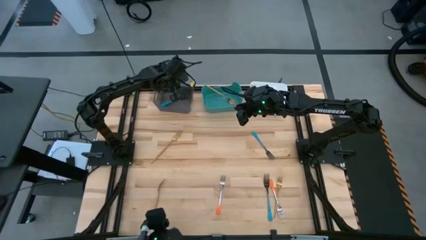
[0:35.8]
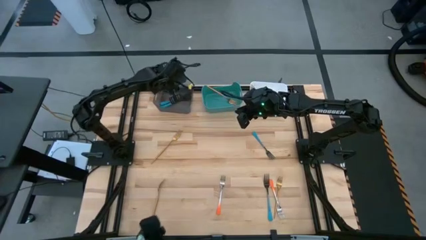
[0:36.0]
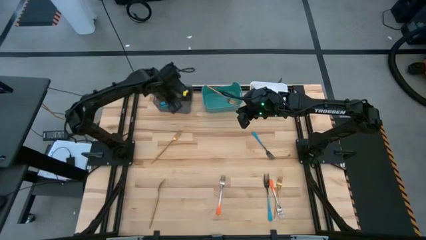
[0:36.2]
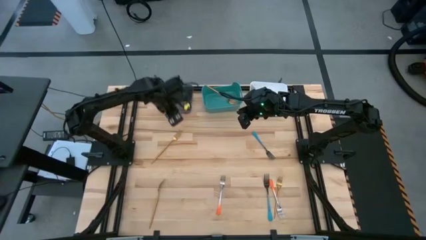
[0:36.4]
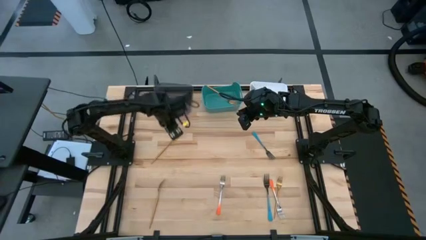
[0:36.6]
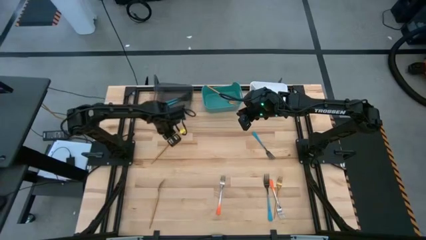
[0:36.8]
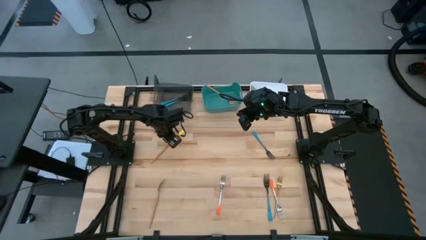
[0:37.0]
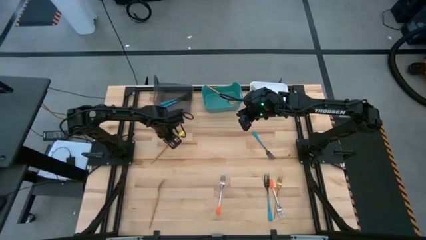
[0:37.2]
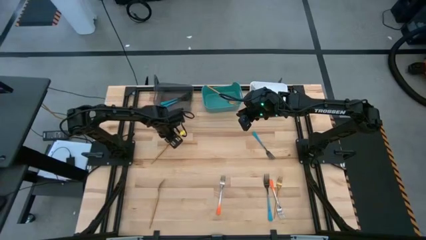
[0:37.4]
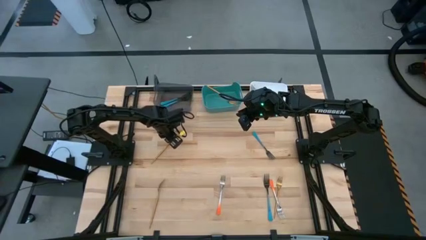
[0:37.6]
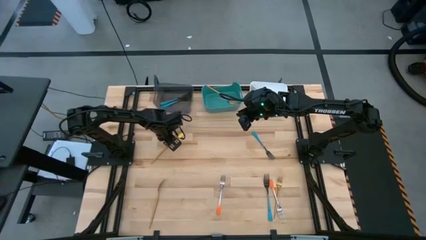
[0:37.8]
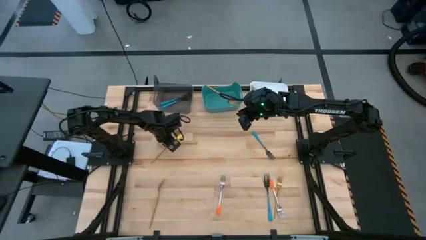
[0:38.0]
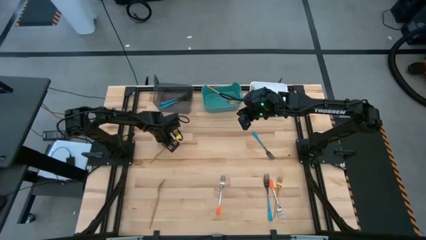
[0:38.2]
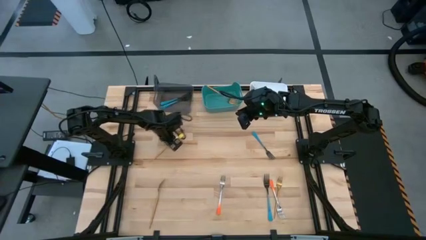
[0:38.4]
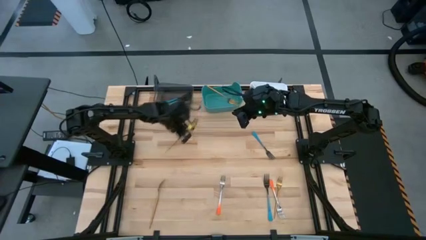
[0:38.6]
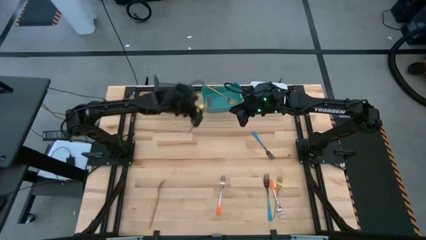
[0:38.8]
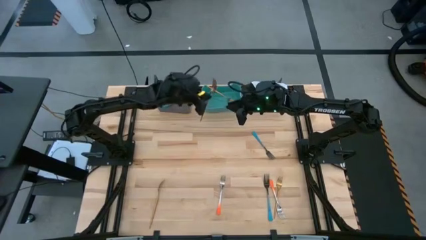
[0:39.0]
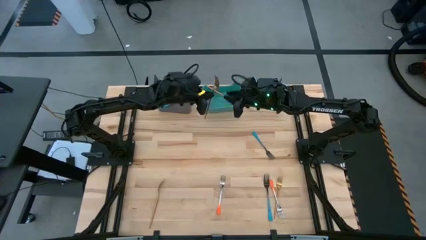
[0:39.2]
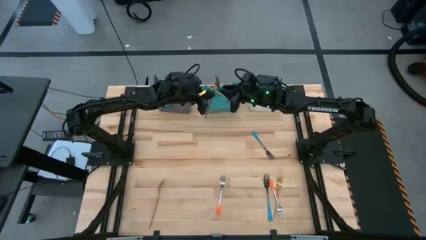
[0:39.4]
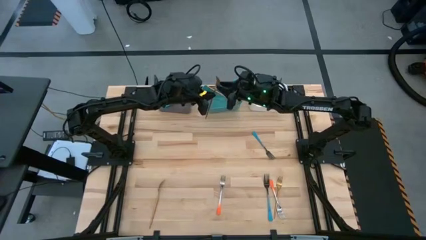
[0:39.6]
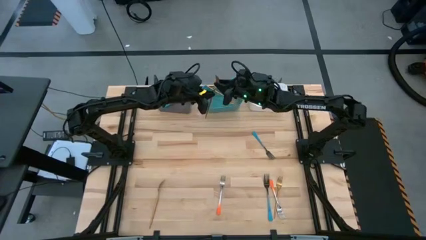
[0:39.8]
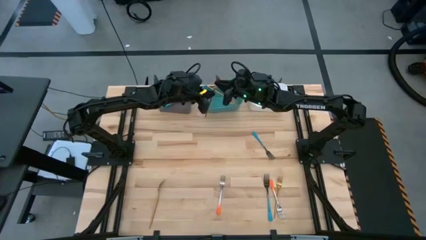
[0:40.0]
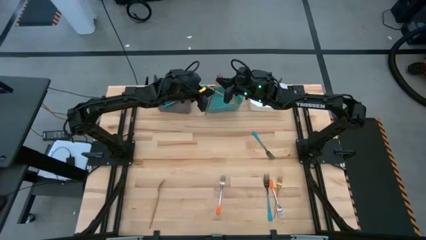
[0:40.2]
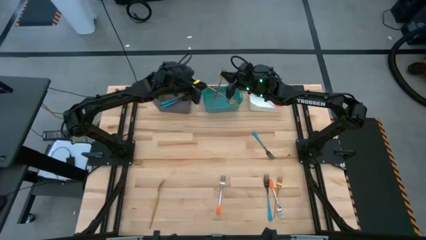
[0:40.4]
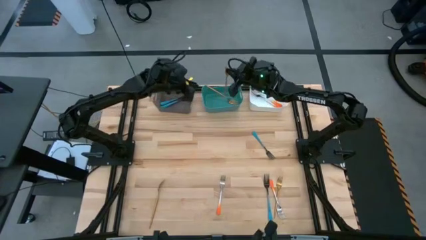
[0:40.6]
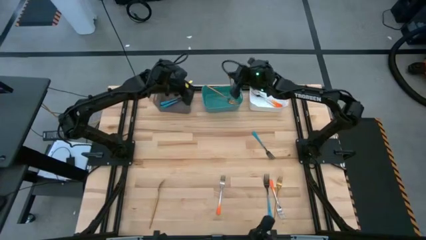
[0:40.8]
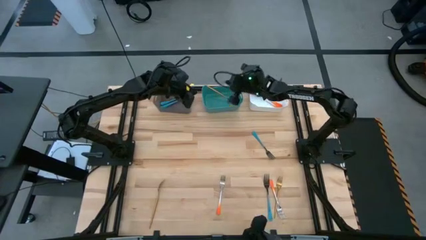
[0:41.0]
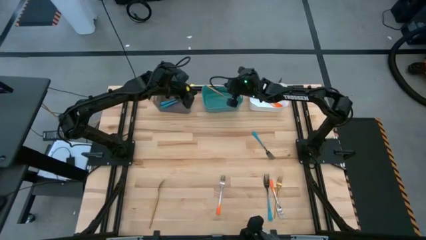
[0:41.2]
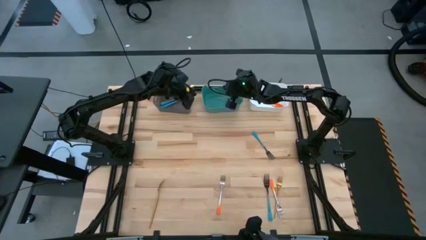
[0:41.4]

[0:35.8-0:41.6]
Task: Sort silverware by color (type)
Put the gold fork into the green bin

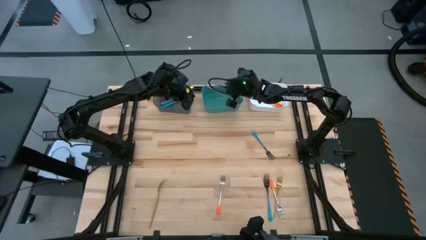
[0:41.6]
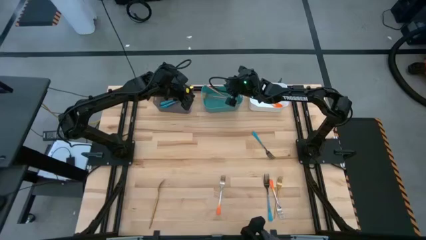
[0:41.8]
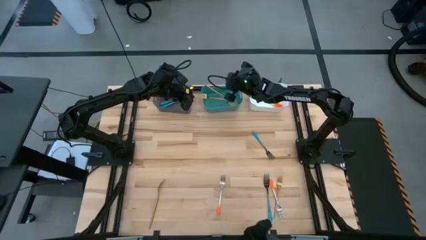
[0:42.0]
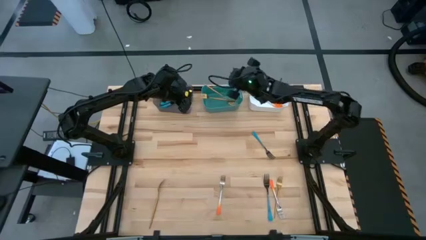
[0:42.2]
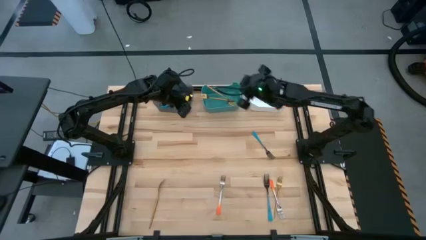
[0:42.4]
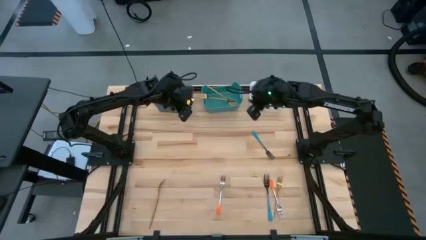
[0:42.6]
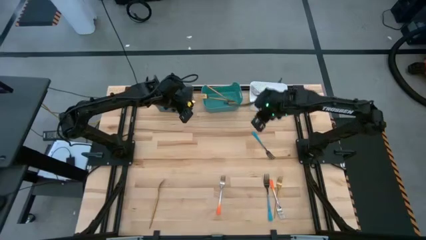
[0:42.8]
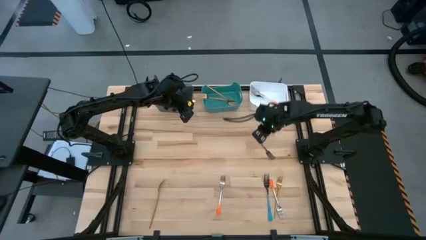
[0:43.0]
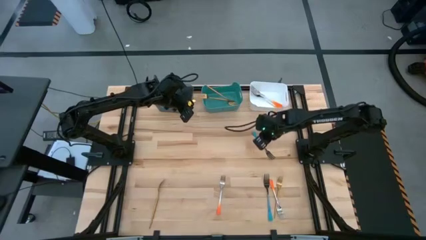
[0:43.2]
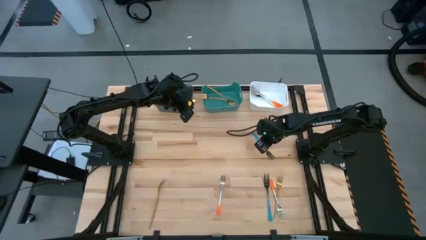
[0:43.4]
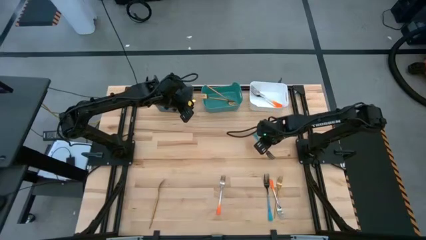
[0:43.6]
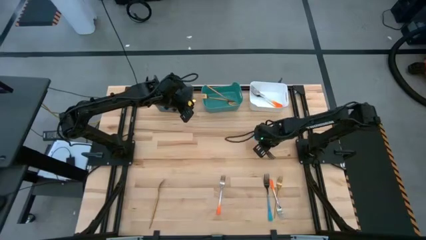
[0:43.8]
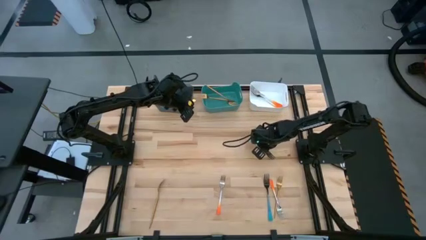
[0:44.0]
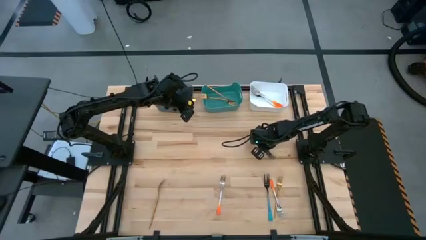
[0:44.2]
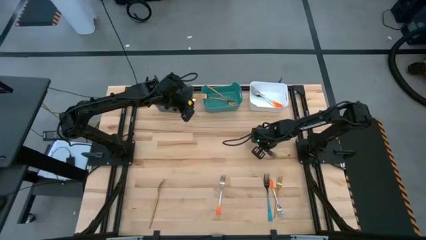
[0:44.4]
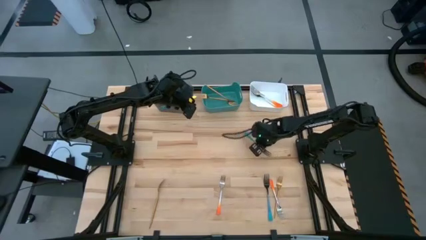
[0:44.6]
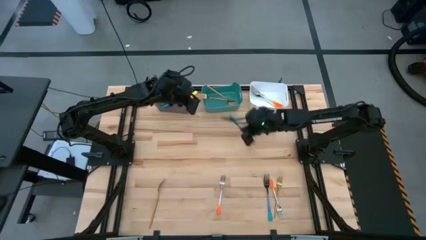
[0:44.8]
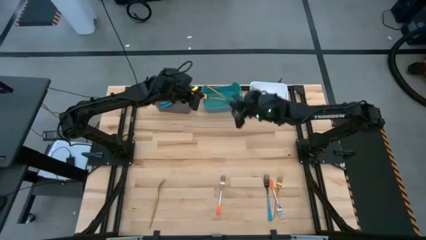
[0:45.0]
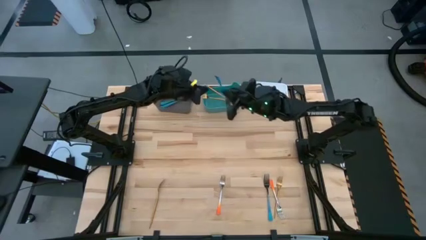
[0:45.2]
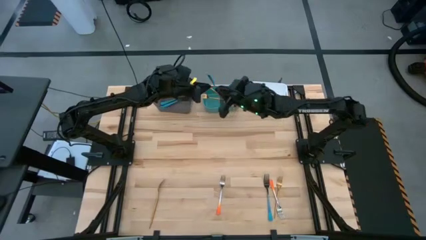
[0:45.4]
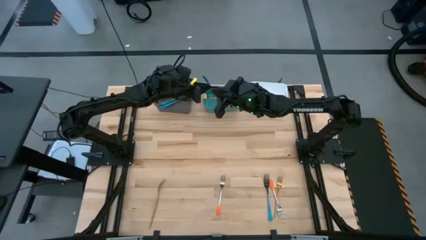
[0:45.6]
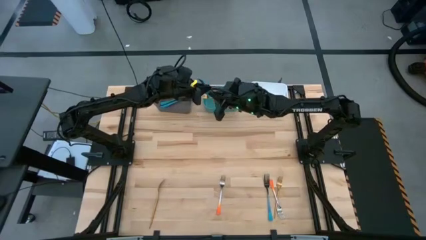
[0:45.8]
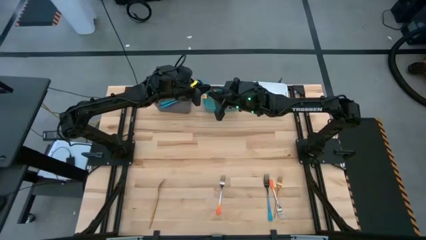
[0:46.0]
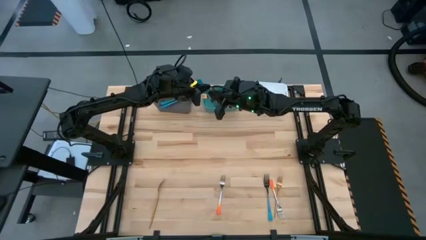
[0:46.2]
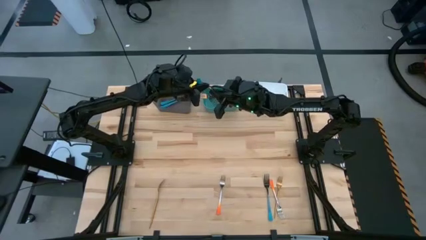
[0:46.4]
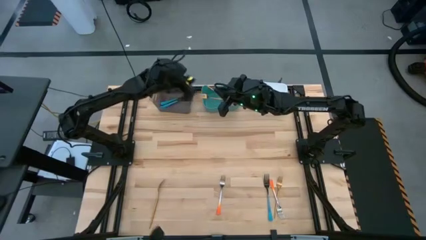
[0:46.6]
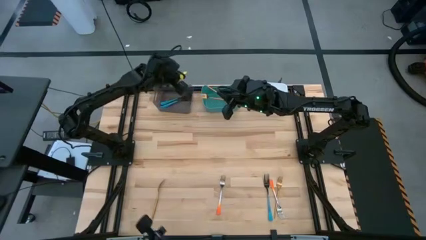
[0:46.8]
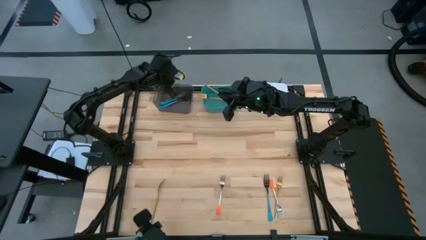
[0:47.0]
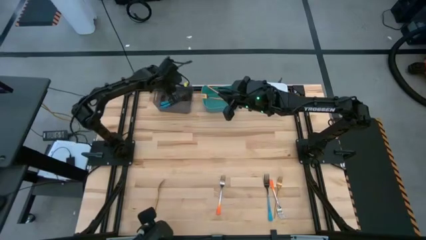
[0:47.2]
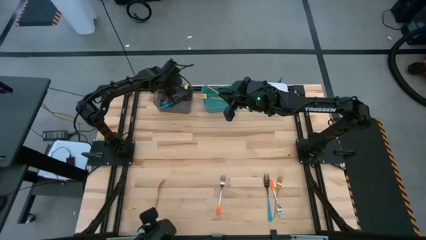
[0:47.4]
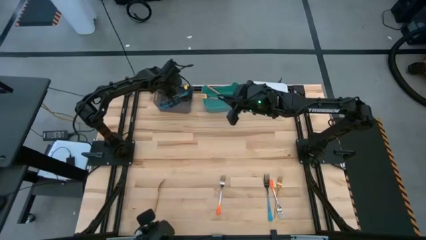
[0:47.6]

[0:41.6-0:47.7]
Put the blue fork into the black bin

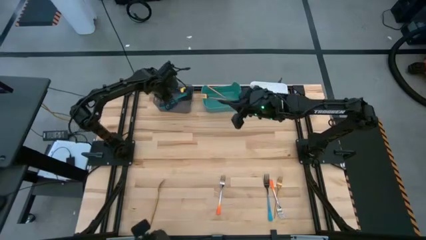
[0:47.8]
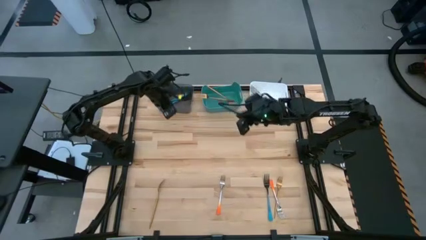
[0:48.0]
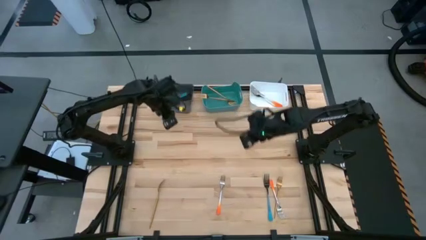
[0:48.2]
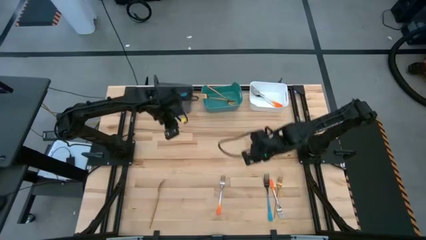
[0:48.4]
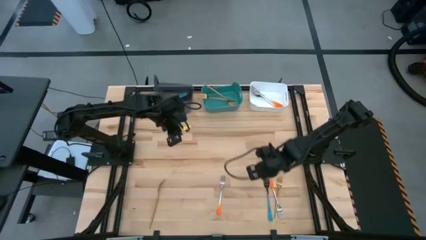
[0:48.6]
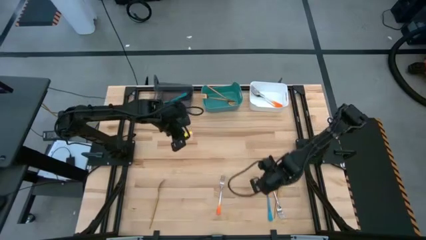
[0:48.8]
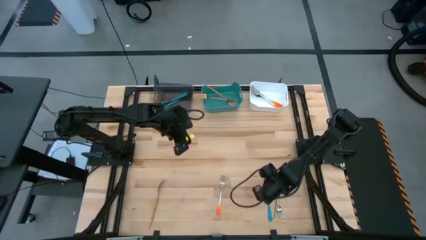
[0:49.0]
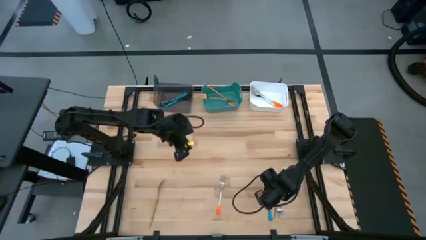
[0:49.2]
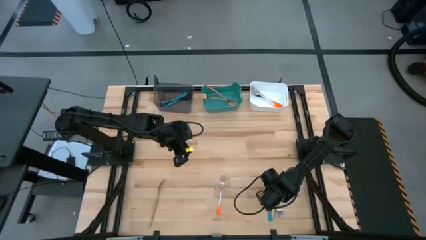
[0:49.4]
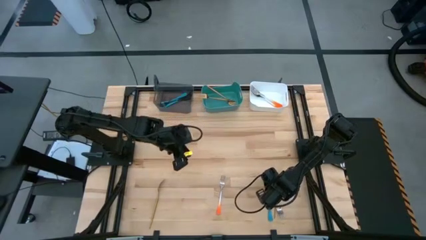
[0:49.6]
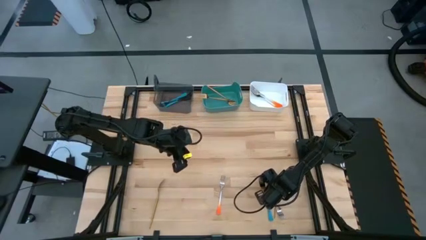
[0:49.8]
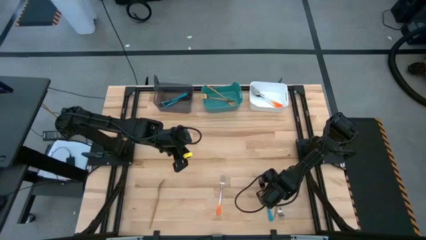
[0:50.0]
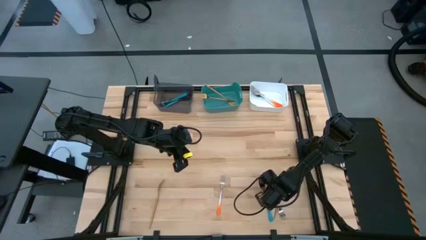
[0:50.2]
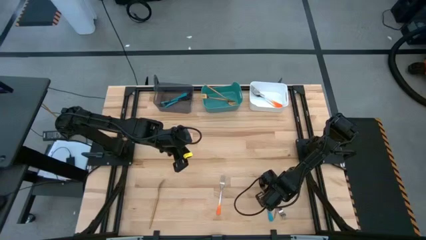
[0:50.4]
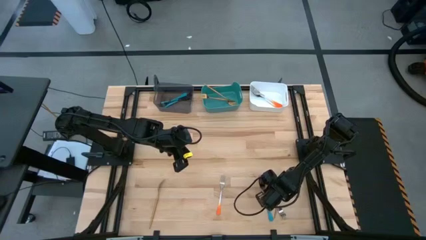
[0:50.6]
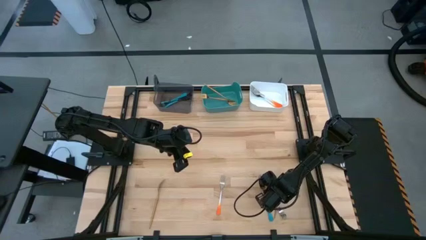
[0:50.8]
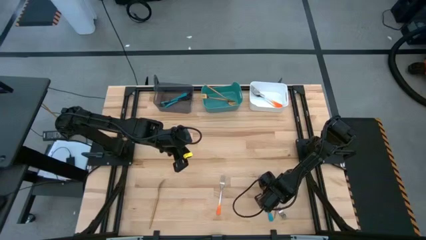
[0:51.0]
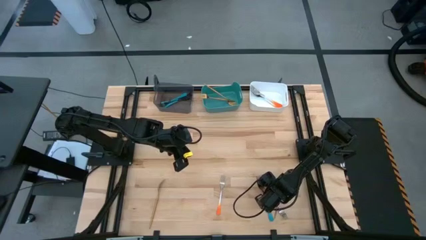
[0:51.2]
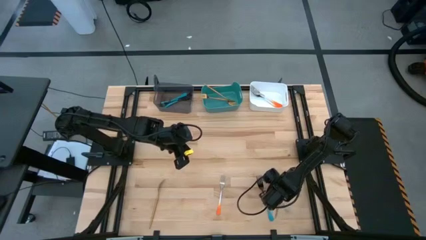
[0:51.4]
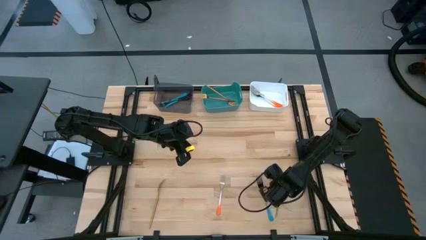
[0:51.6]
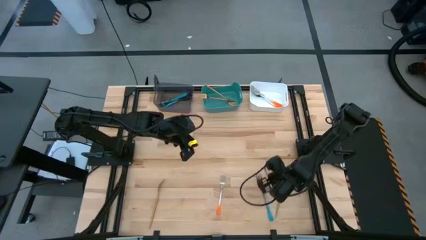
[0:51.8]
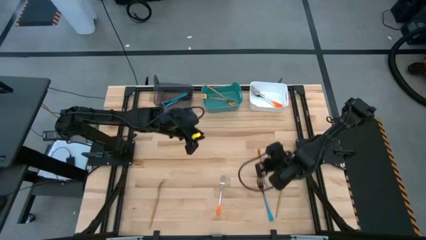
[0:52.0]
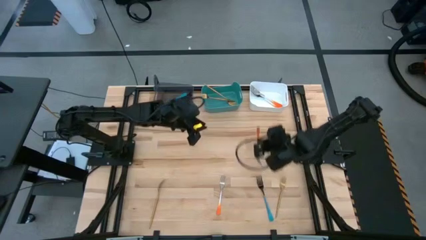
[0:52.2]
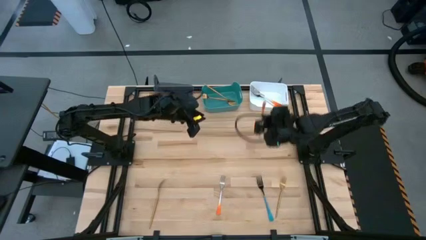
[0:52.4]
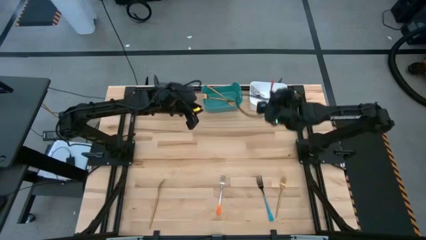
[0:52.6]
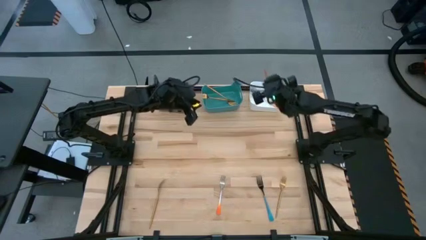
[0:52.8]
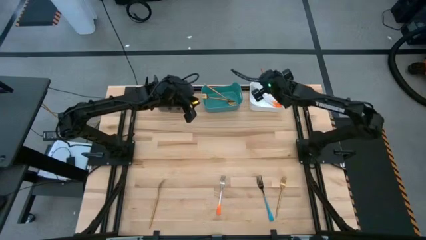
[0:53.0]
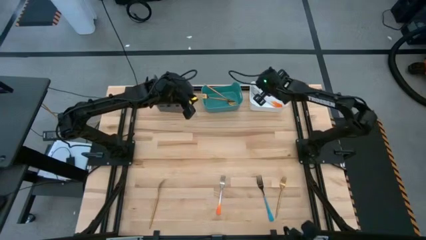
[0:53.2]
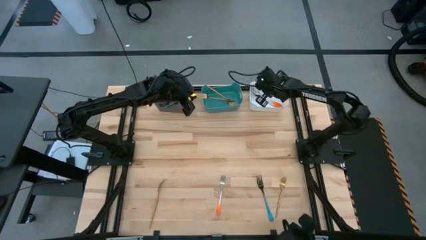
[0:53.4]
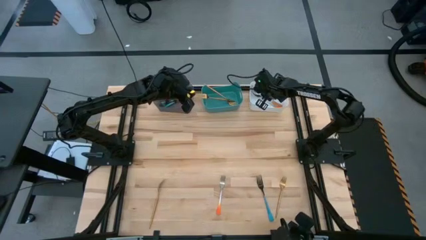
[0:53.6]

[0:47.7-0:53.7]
Put the orange fork into the white bin
